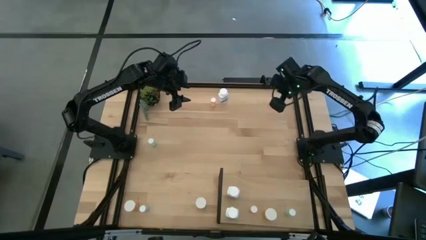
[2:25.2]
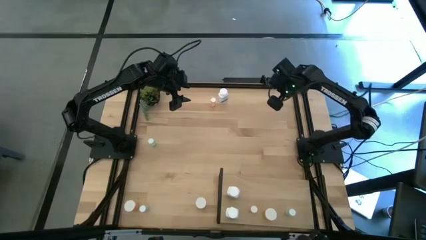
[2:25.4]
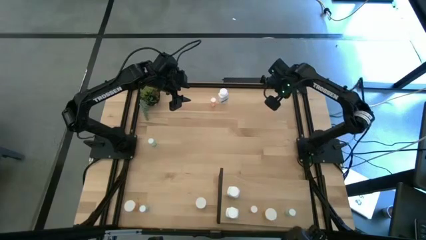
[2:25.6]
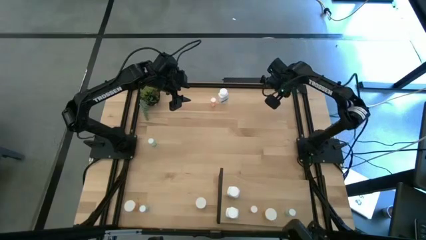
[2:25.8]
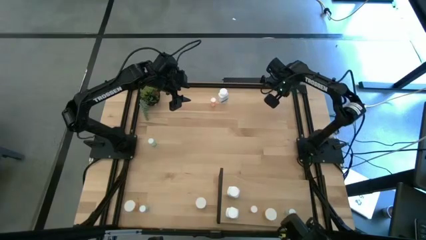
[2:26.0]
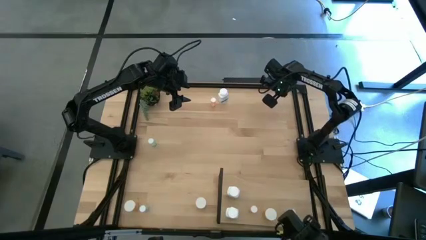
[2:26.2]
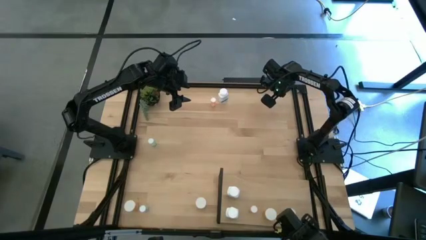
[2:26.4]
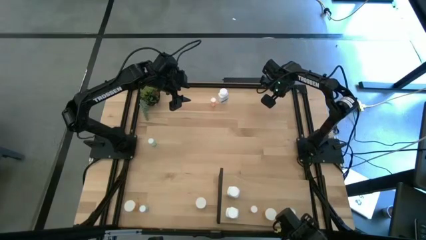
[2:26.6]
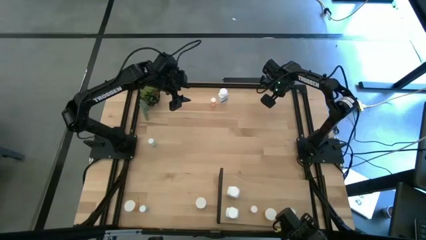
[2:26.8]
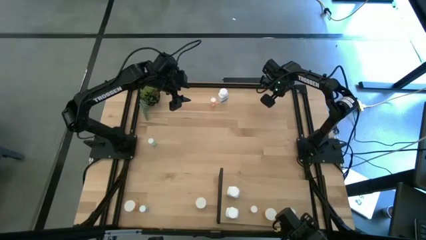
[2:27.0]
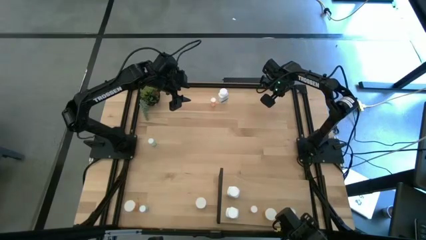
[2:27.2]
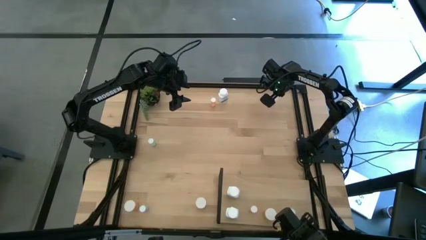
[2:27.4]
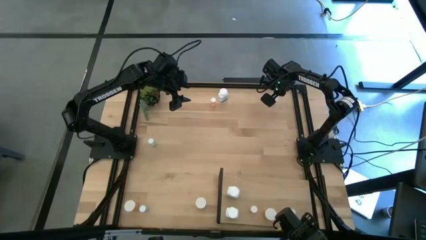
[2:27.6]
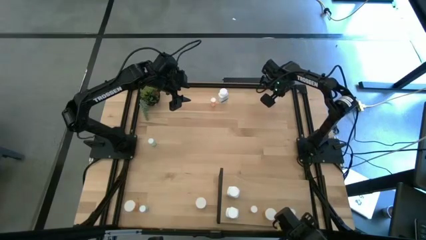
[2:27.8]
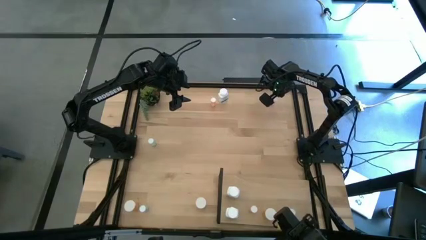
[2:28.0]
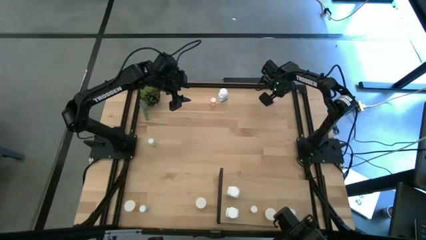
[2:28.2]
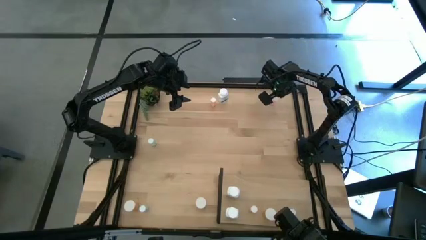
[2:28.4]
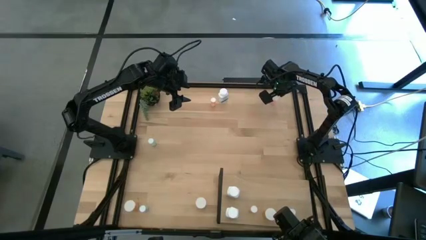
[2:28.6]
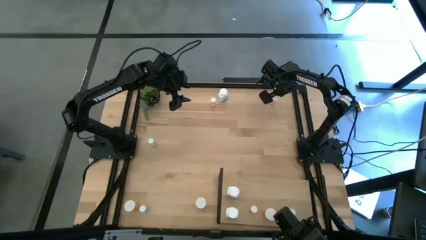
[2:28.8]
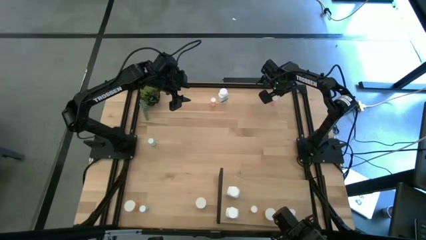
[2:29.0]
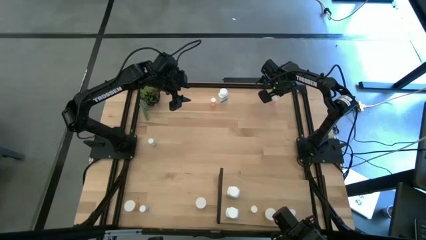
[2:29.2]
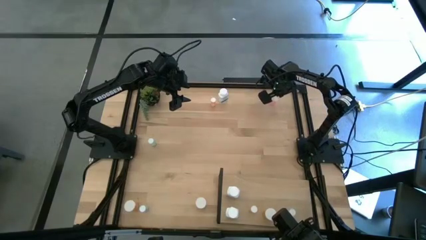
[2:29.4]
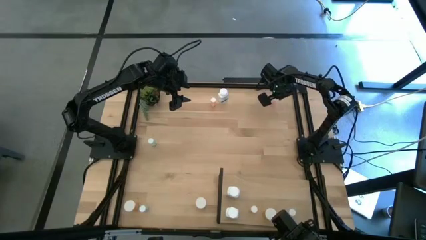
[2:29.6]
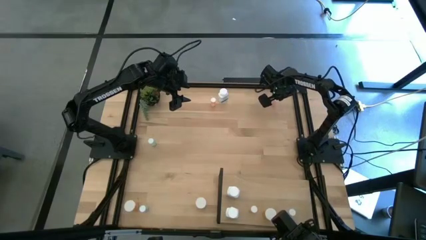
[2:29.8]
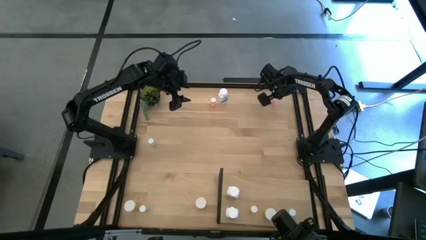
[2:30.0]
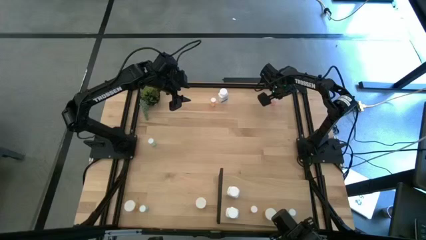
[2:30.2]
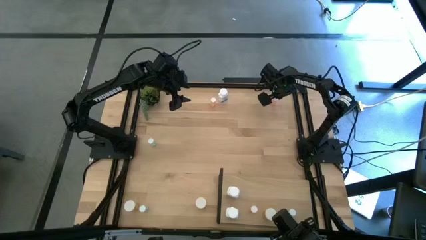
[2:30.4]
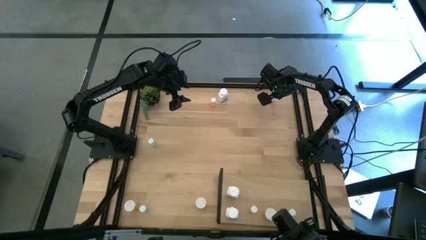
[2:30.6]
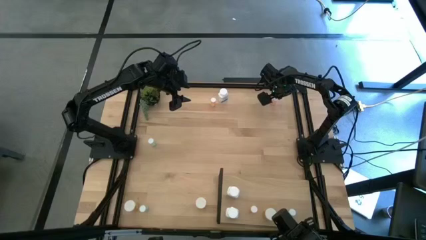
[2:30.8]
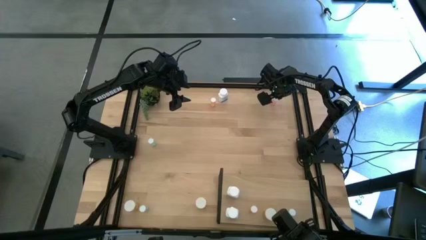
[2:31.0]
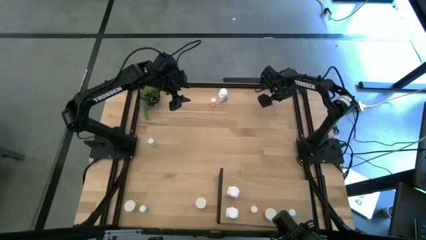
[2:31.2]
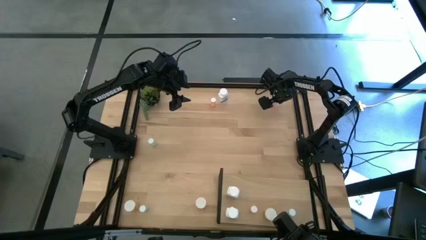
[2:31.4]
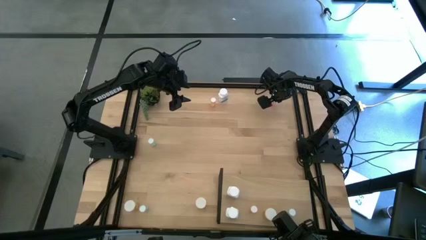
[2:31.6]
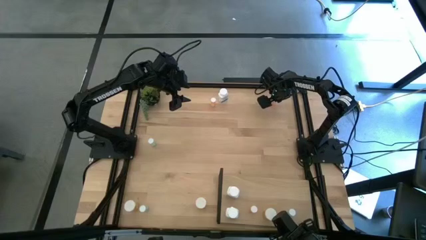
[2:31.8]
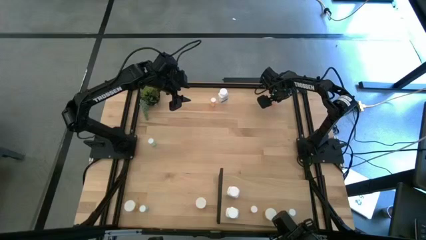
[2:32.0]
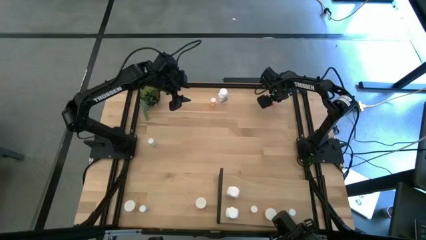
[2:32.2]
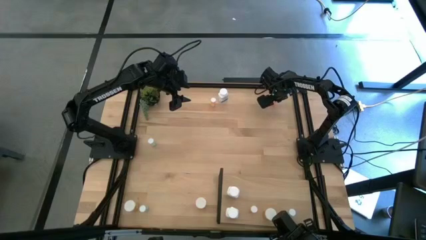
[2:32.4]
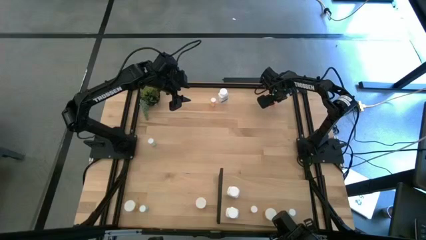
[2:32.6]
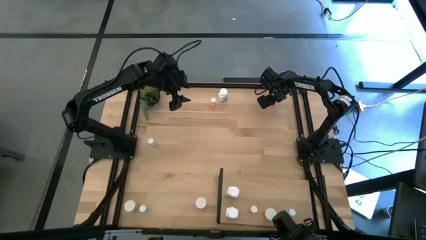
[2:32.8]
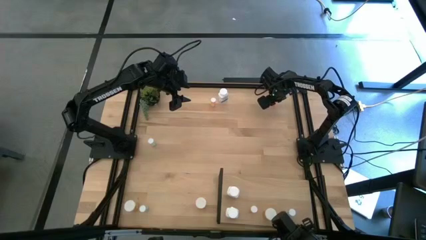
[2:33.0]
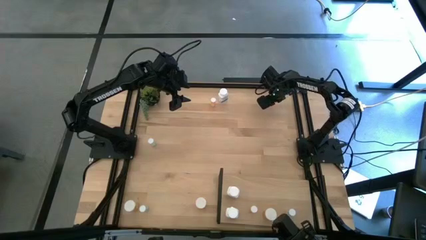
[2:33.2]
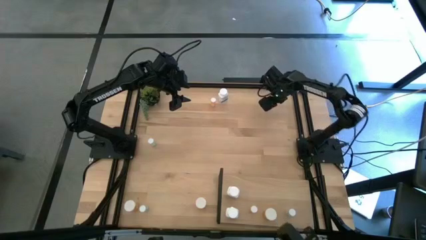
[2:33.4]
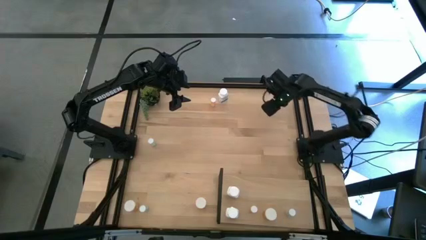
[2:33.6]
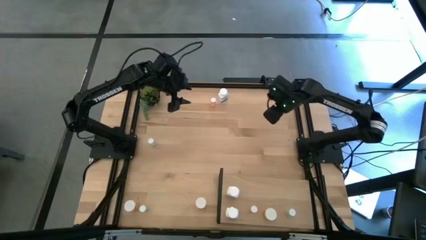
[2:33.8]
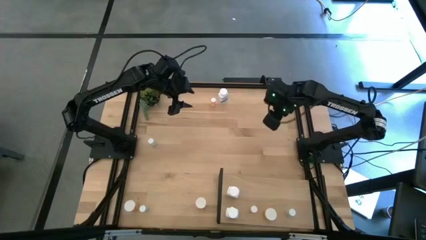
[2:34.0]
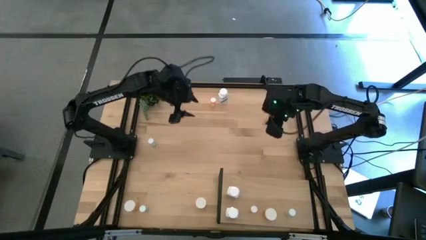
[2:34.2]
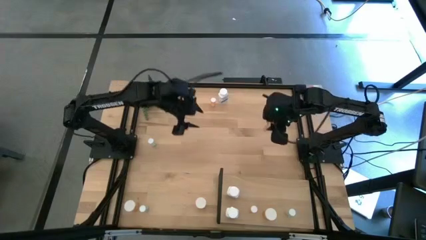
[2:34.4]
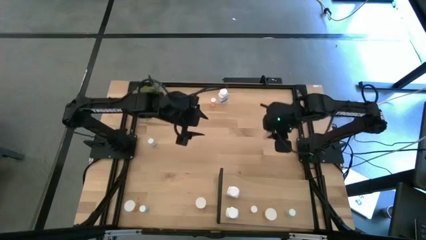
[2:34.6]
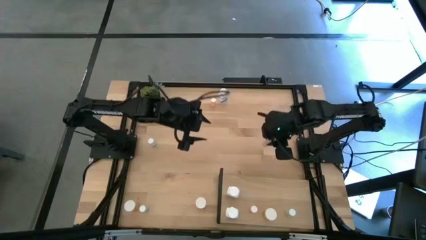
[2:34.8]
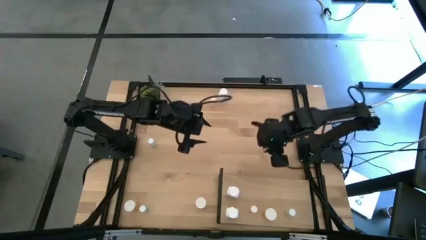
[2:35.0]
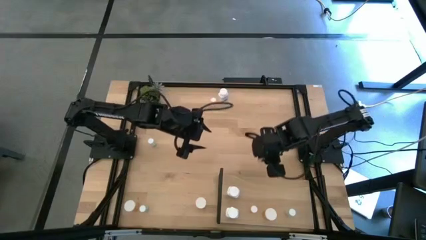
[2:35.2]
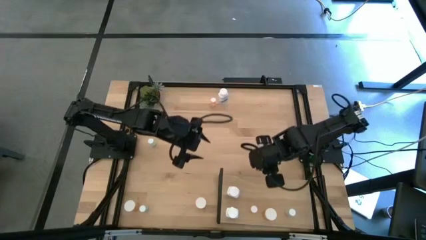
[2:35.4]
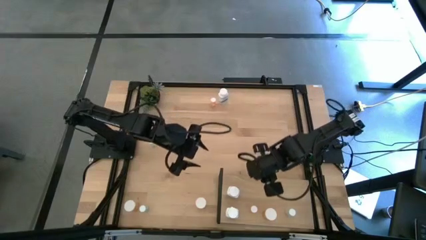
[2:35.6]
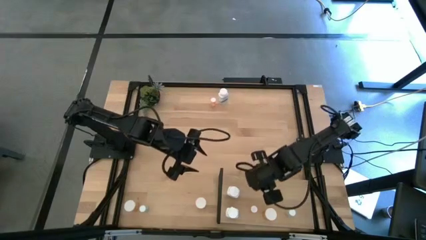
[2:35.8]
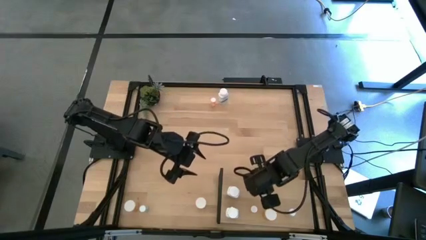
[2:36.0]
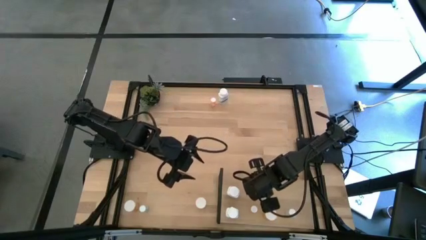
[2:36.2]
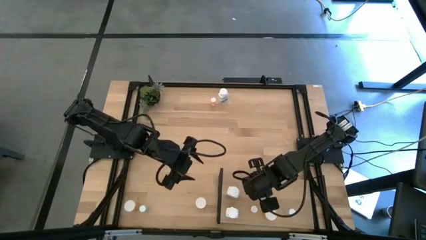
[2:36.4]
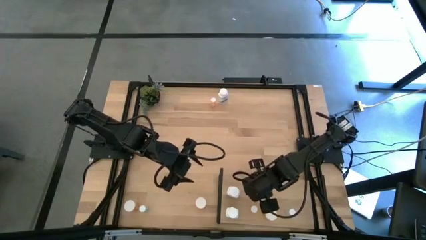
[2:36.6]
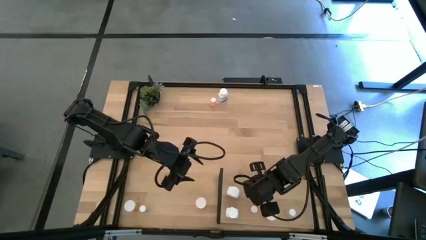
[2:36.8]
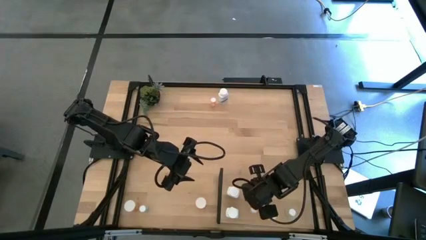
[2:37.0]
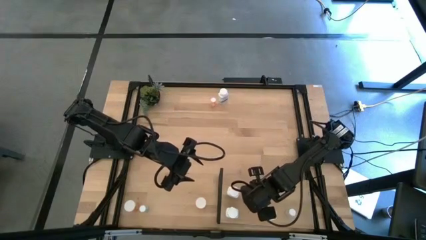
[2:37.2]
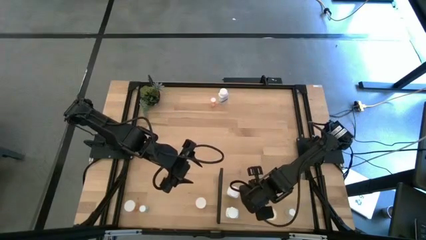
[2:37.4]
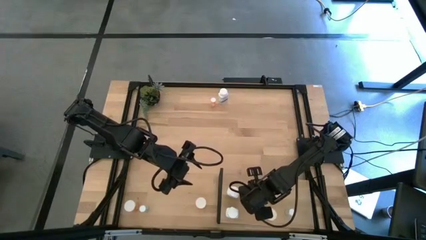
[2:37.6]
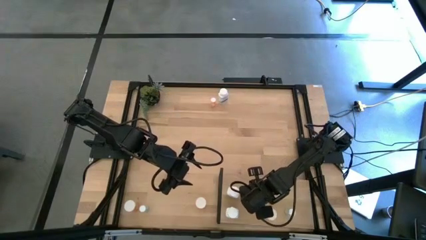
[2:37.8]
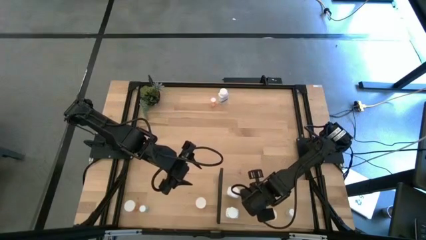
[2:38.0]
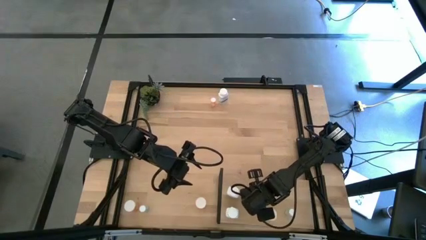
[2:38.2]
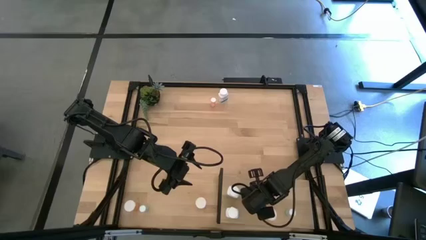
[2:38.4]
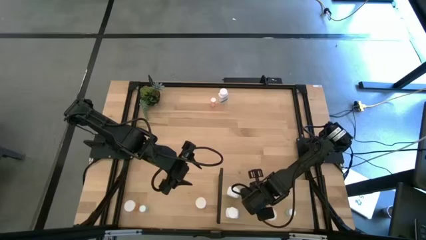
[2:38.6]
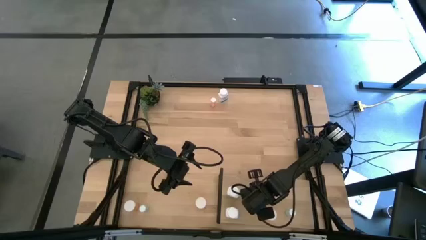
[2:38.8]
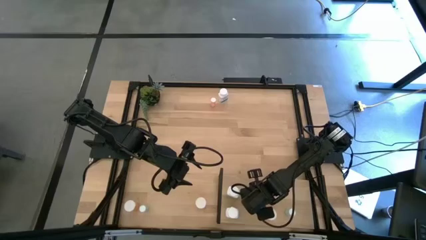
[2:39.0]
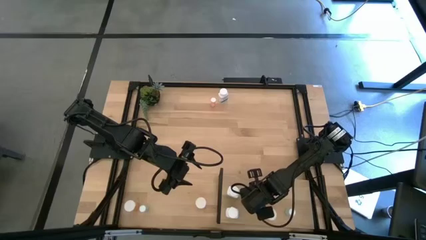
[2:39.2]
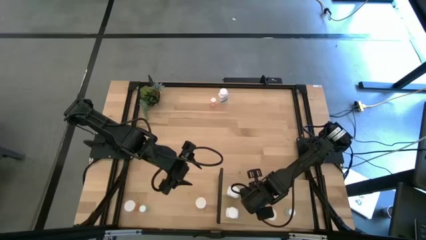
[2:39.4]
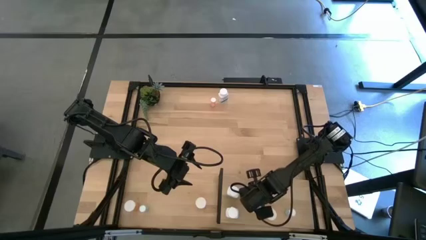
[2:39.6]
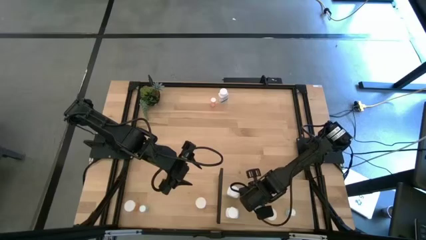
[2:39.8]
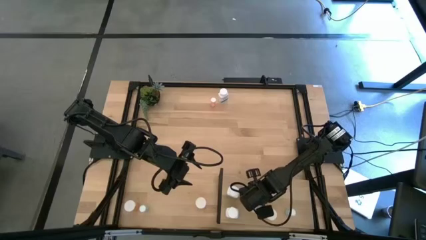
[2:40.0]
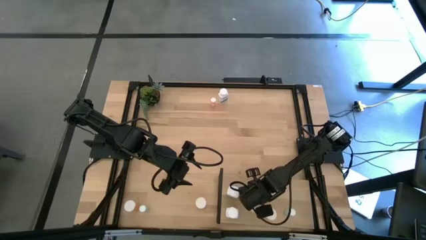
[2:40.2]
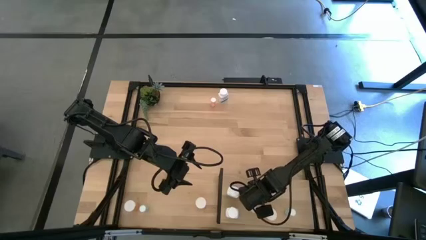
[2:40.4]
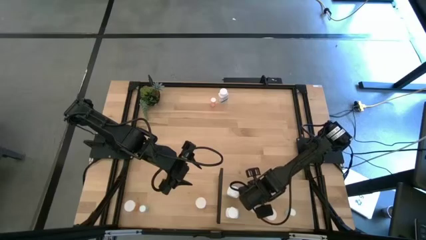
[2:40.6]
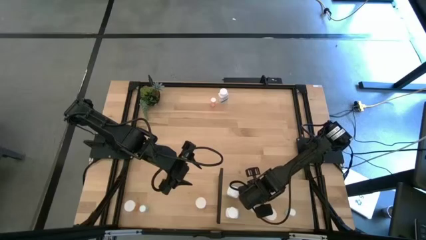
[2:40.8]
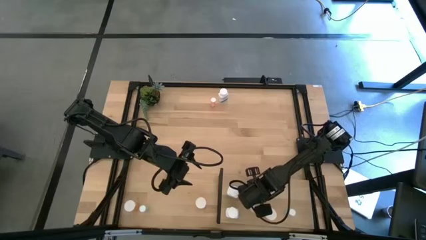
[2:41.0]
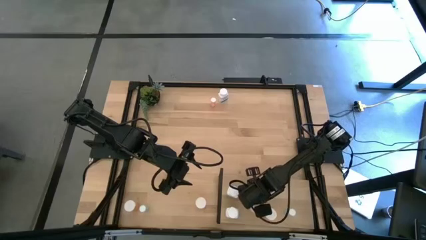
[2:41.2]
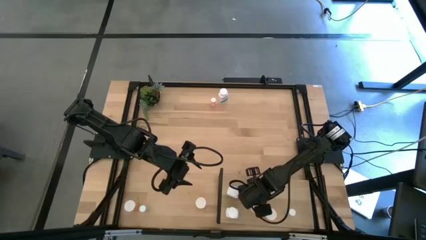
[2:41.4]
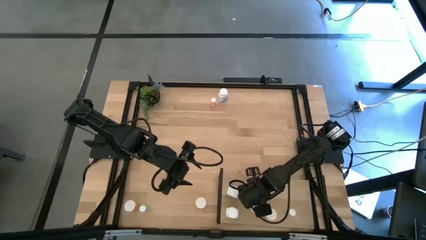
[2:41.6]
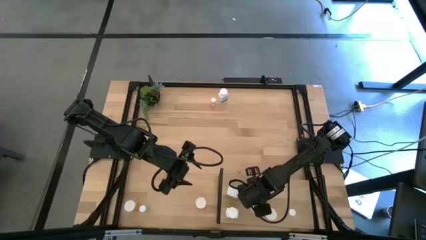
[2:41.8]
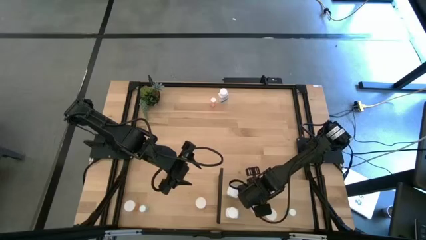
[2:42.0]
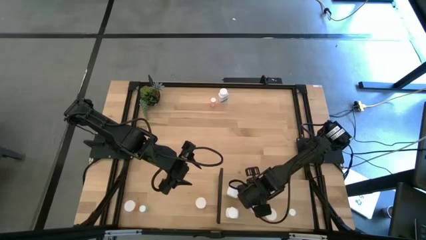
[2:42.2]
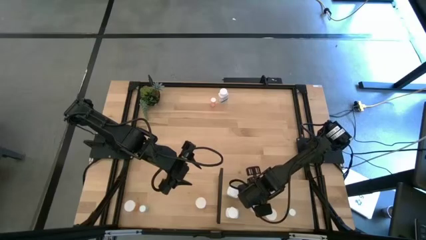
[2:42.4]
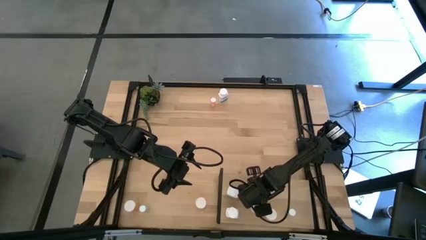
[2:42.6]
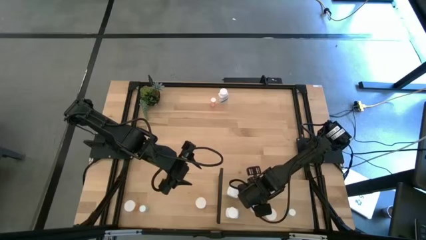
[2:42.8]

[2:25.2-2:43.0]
Task: Pick and place medicine bottles onto shelf by color
Put the top right pink pill bottle on the shelf
